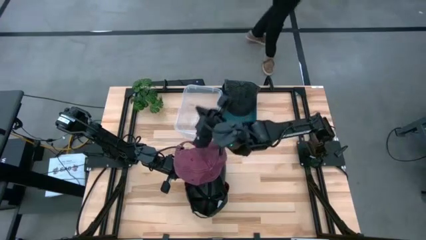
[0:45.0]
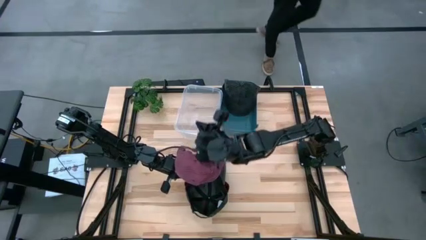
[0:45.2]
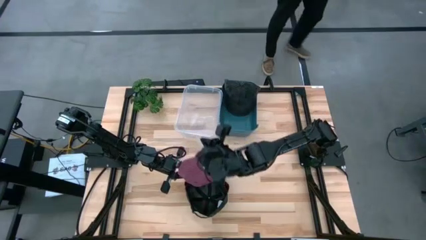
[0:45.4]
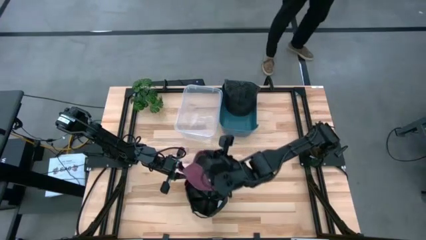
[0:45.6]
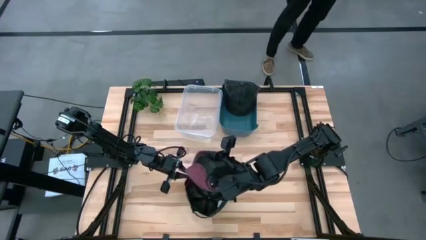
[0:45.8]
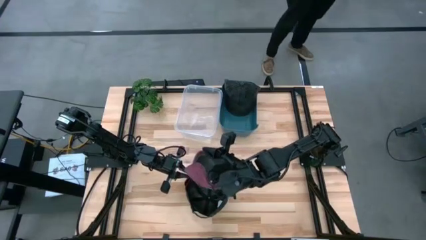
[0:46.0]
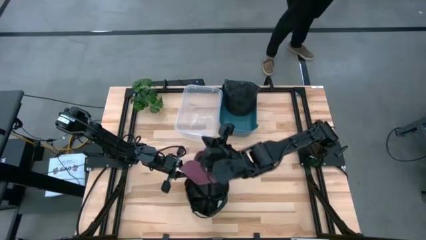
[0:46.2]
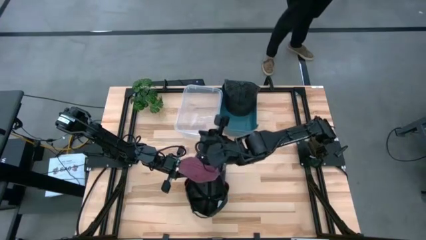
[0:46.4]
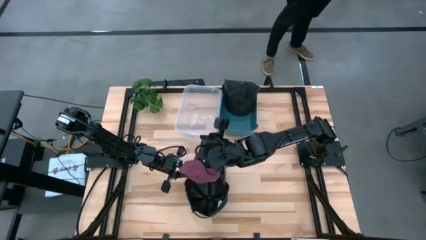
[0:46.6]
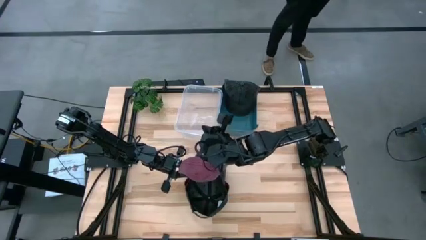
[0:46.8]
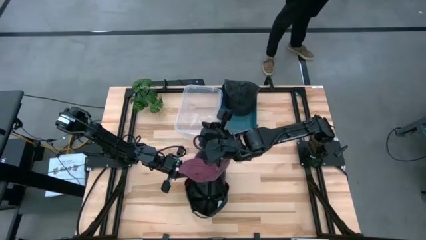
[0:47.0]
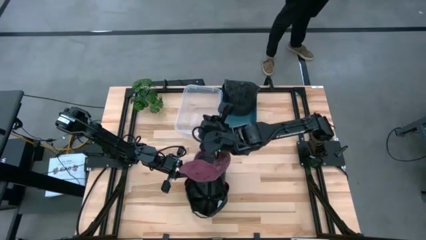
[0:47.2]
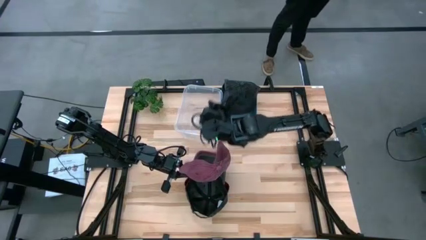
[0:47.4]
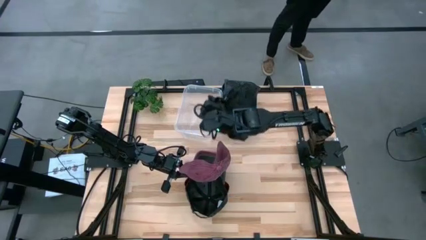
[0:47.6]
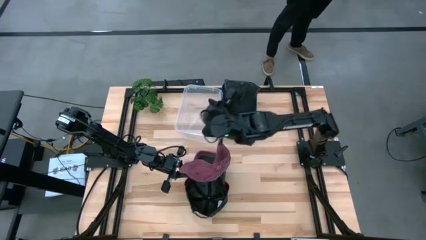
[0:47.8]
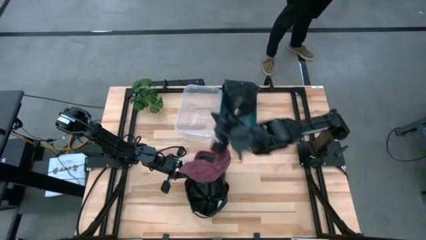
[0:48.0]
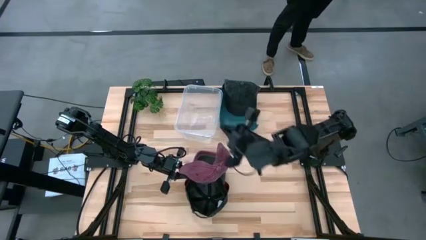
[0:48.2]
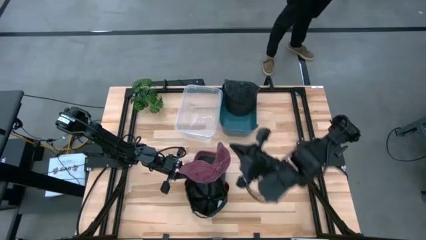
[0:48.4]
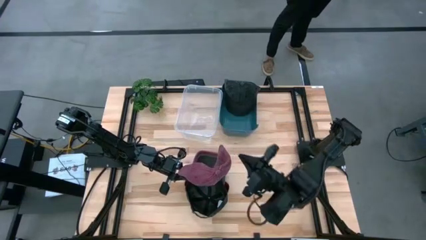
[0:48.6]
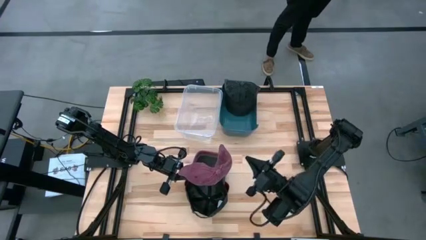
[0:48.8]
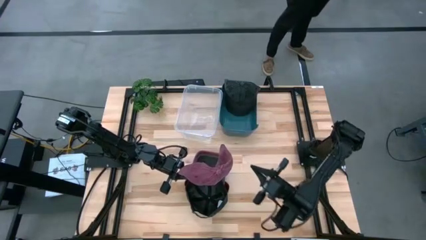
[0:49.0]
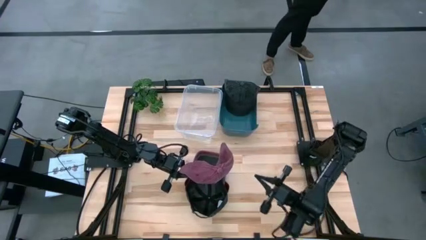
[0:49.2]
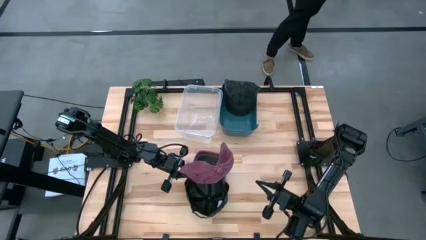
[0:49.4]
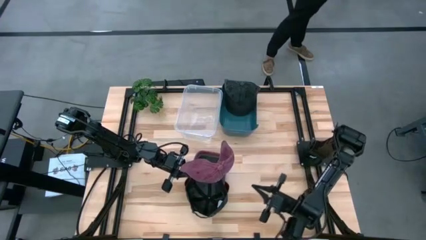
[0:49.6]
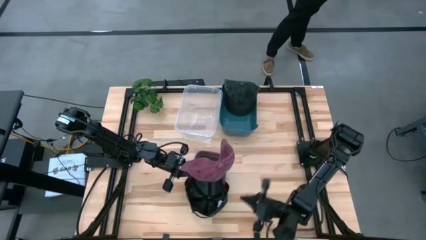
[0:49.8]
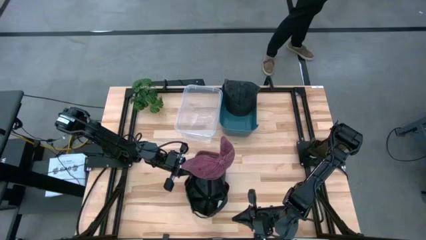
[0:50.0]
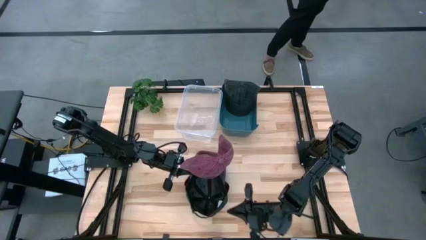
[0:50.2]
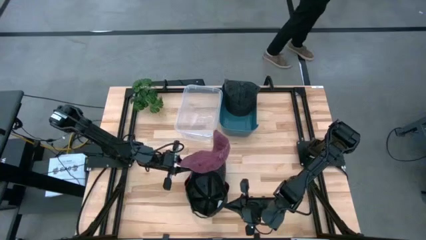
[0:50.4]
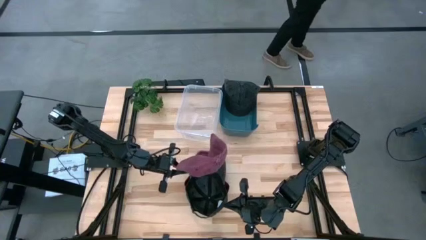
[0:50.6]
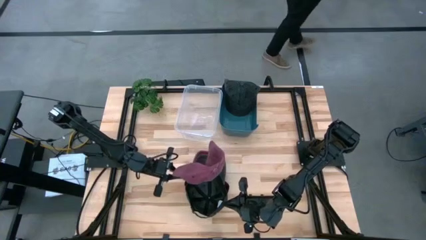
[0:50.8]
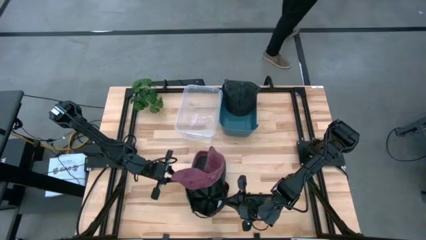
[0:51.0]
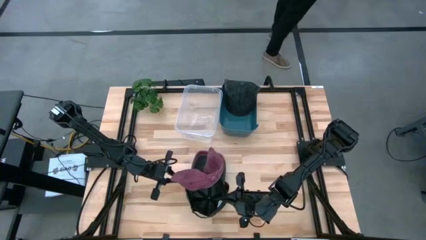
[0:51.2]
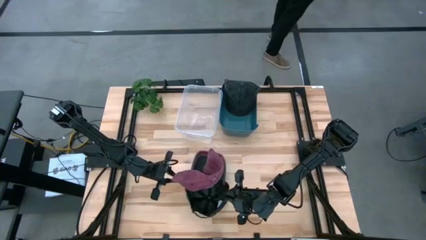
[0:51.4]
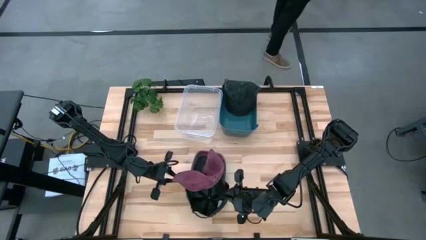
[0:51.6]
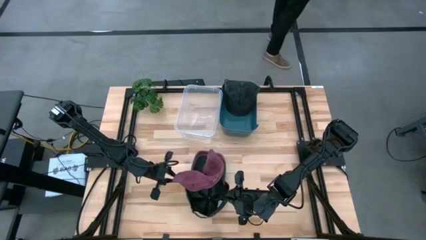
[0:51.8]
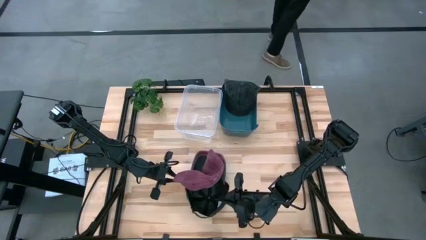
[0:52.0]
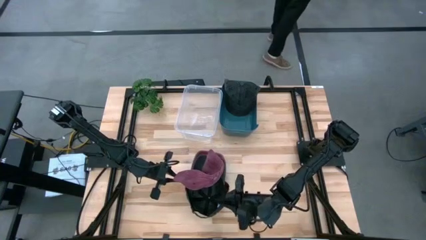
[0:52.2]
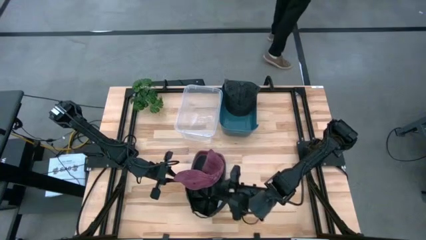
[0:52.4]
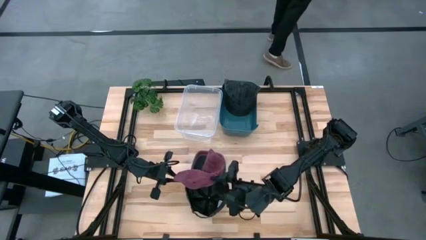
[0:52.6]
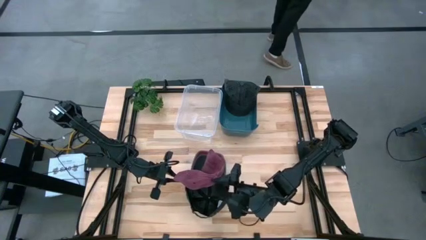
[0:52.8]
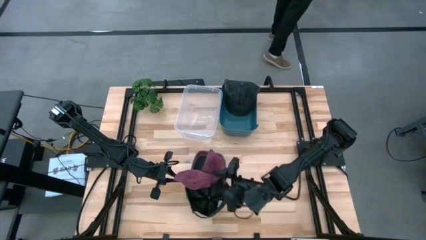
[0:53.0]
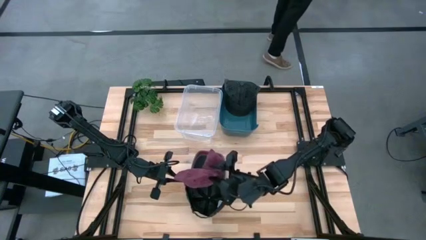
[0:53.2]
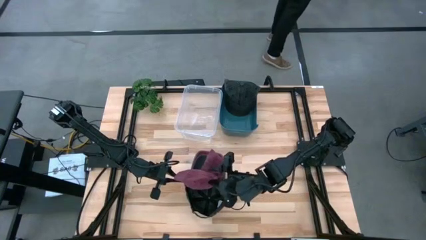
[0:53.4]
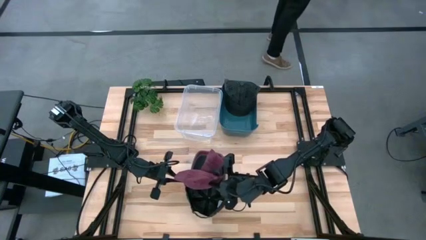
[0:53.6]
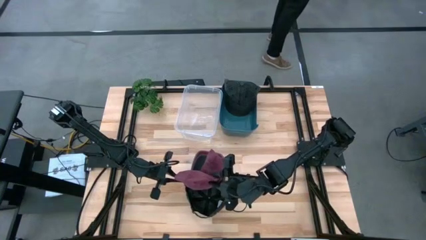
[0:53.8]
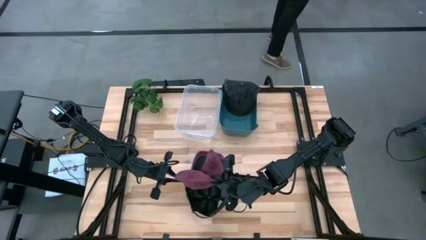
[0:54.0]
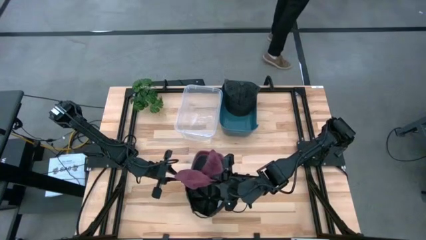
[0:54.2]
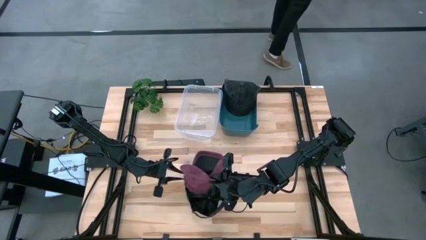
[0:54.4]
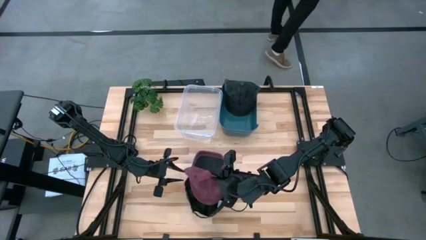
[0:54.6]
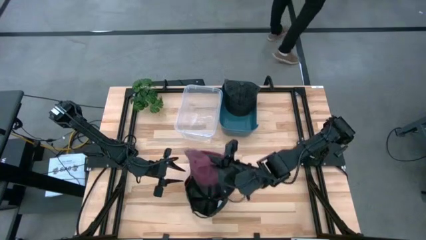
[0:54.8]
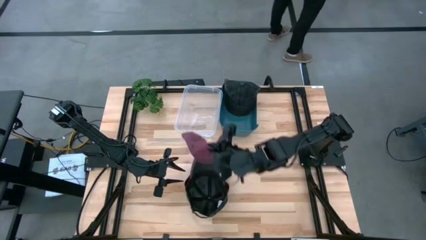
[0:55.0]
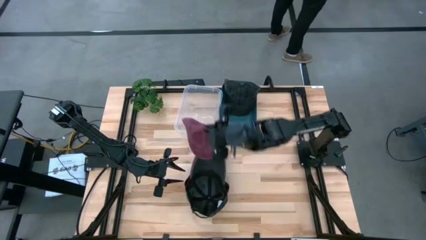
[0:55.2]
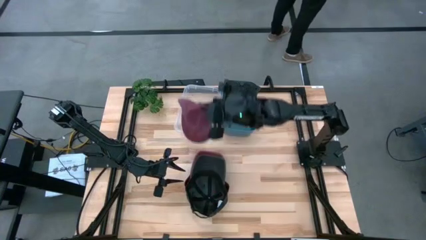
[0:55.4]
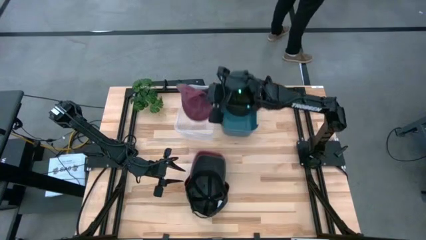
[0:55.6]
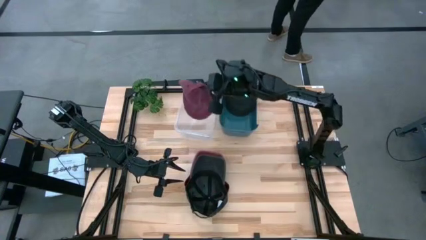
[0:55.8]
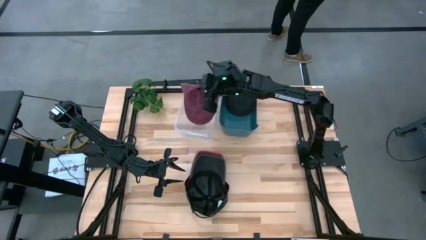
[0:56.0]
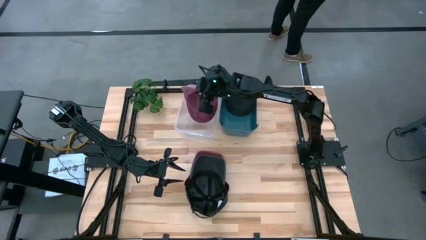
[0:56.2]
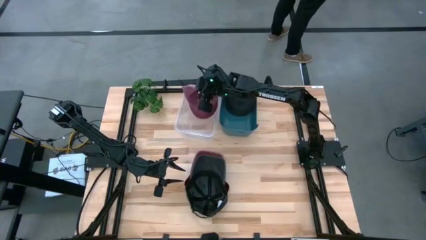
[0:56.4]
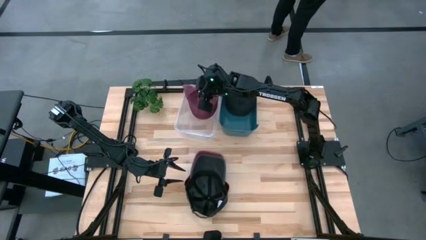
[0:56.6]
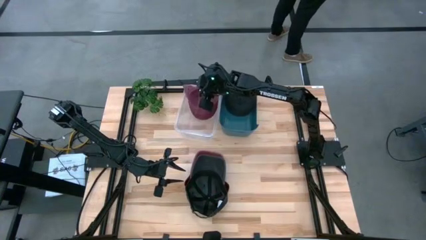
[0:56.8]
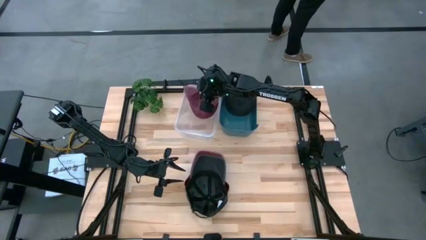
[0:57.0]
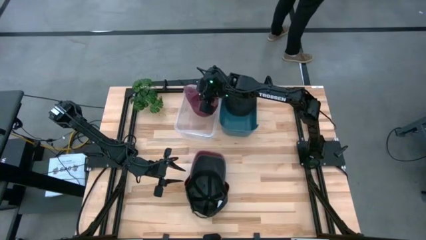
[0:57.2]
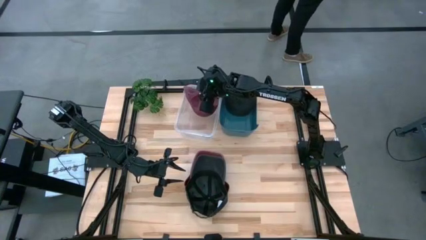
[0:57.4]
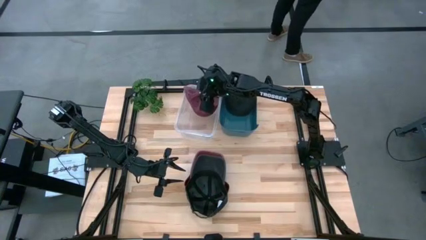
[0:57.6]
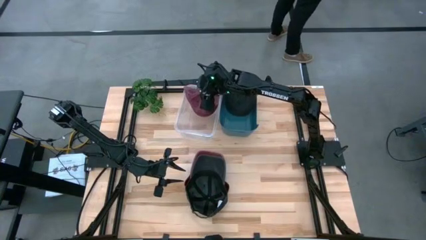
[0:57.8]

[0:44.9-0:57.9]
Task: Pick & Place hat
Put the top red cap into the transparent bin

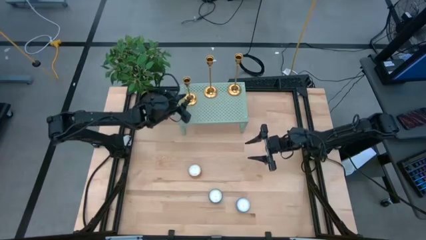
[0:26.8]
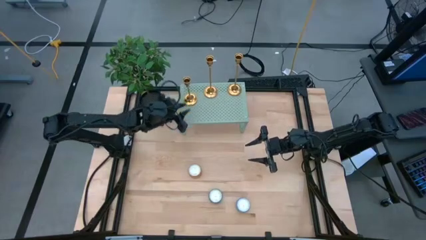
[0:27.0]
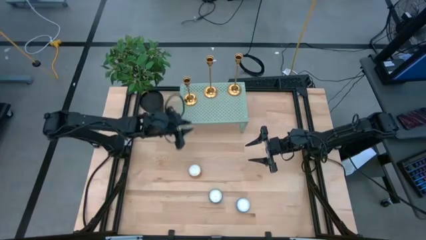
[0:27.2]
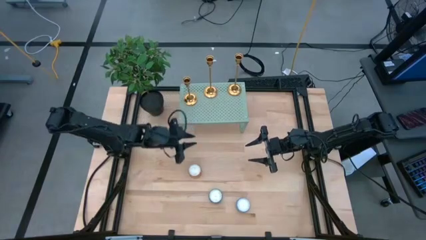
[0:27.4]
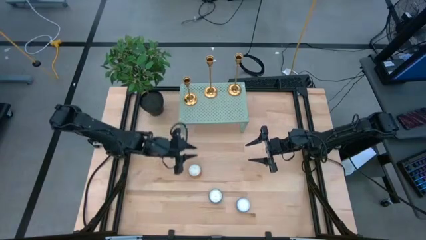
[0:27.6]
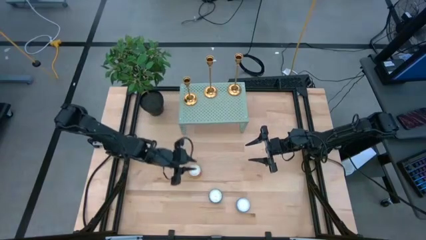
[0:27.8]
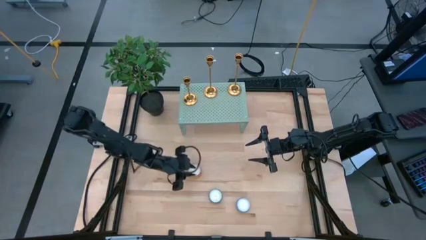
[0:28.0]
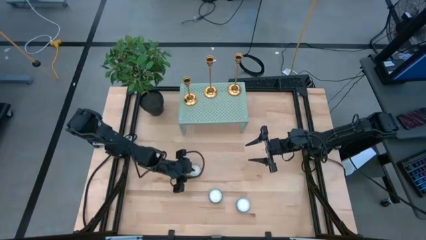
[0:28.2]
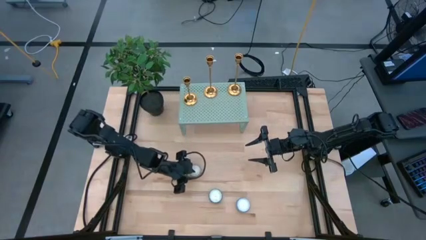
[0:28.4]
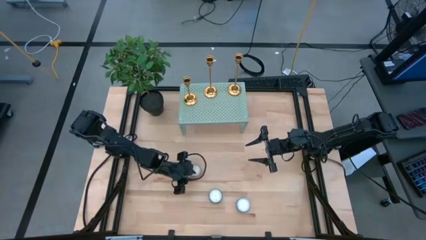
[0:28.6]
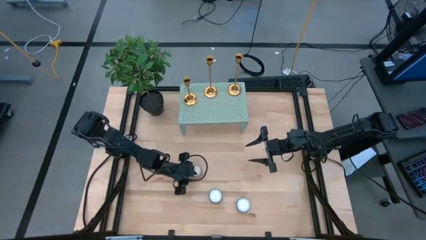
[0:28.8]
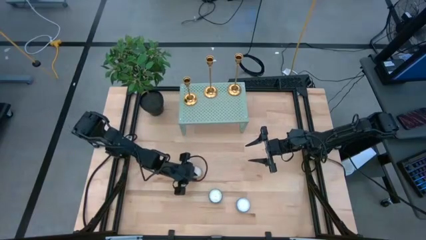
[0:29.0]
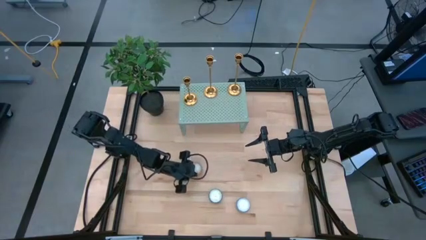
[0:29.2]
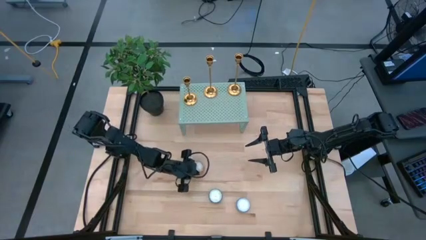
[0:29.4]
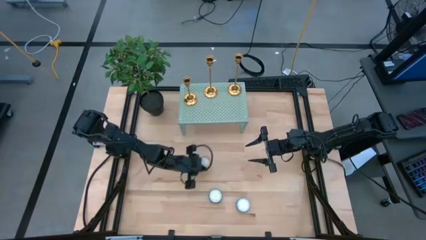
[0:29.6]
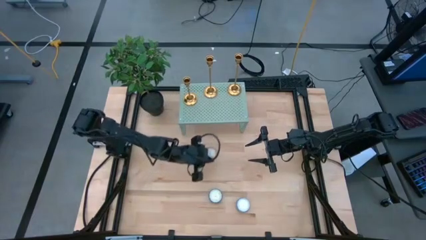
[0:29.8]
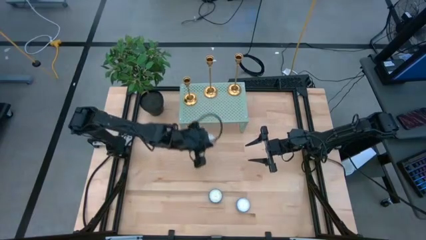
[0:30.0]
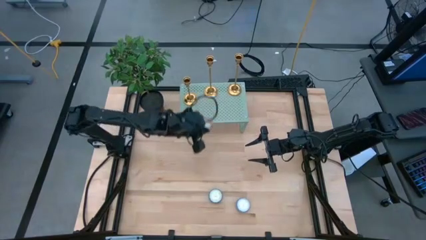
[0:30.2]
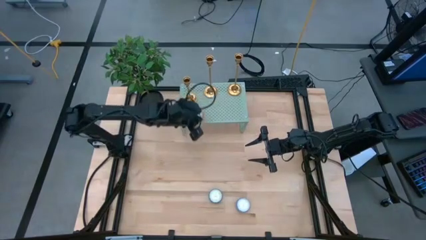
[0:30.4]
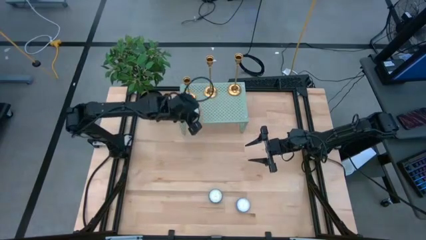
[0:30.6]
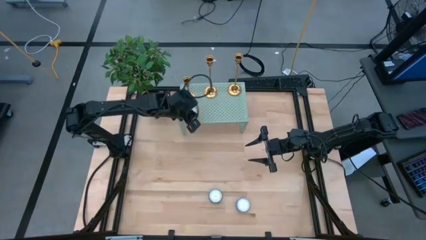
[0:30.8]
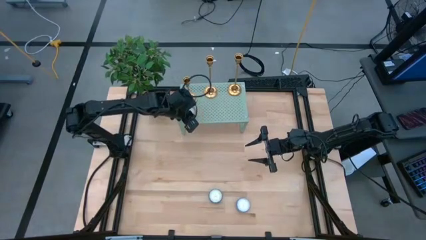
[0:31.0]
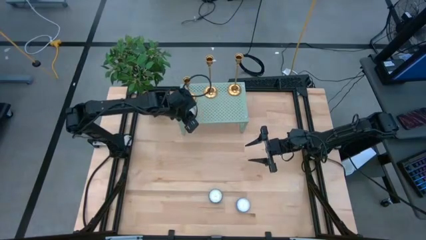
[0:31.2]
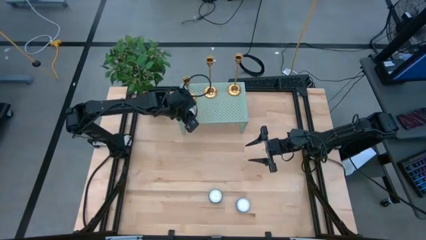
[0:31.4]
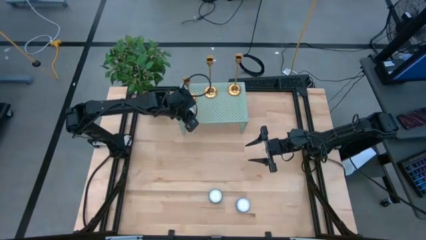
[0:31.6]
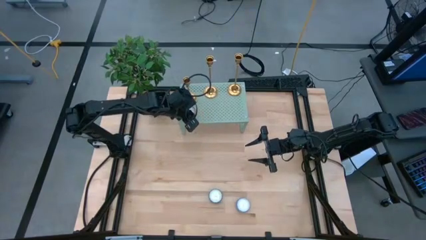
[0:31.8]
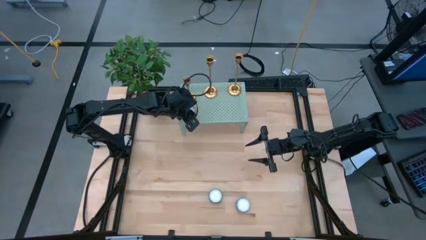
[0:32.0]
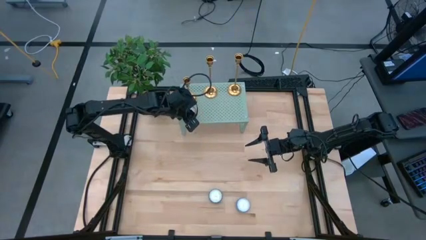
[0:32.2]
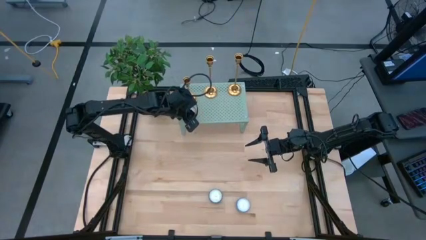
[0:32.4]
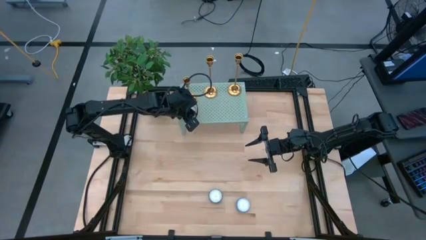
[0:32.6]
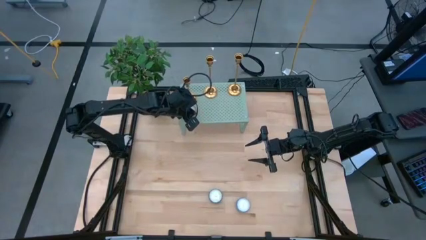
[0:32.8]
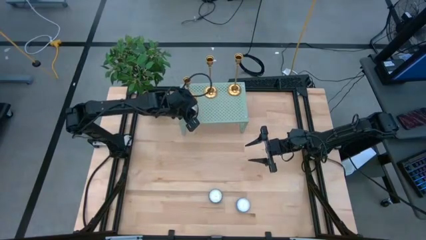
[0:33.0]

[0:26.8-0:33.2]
Task: Pick & Place candle stick holders
Put the orange scented candle on the shelf
